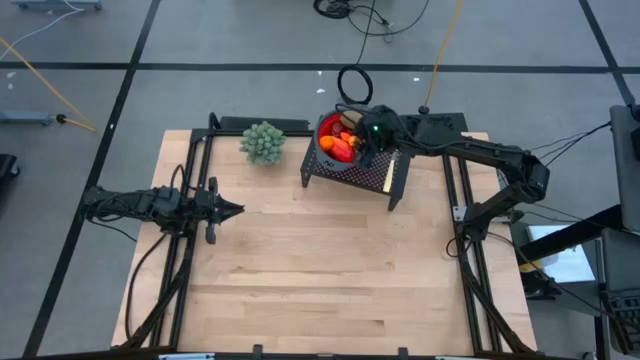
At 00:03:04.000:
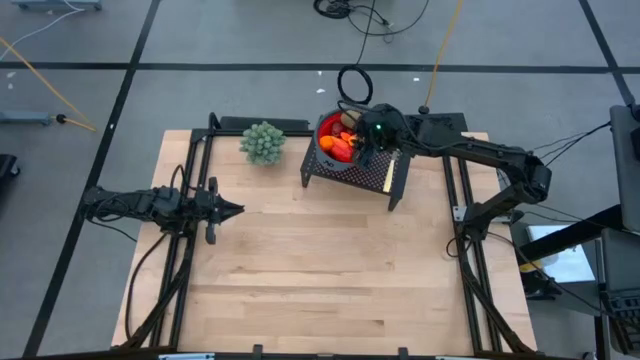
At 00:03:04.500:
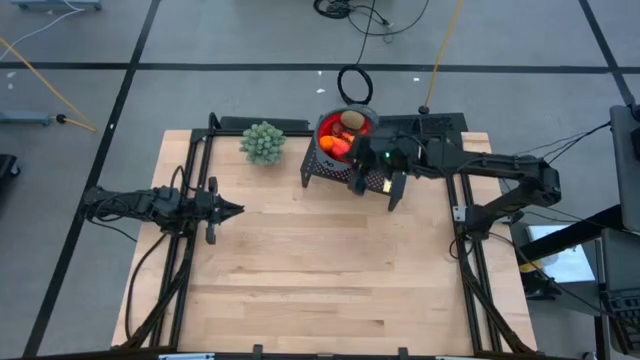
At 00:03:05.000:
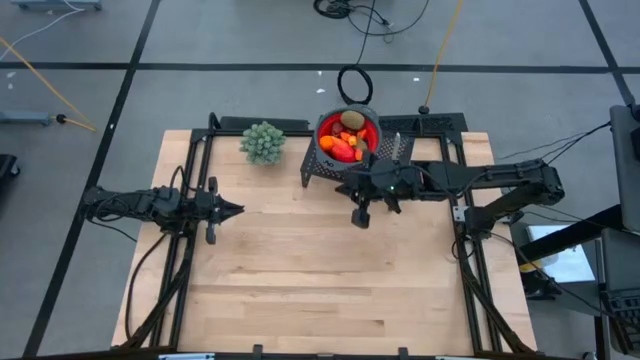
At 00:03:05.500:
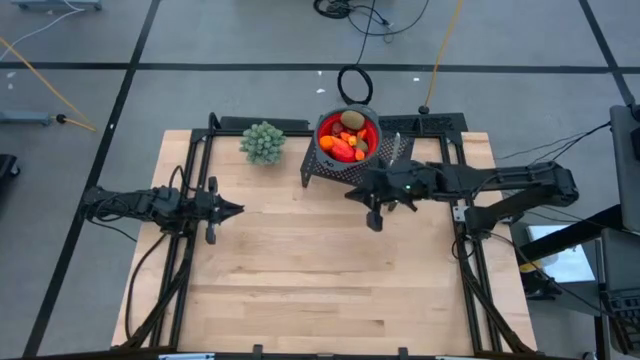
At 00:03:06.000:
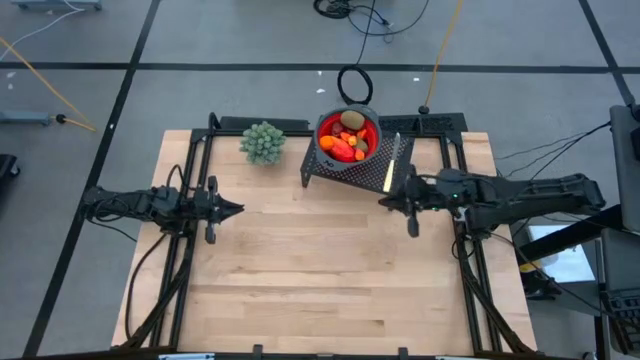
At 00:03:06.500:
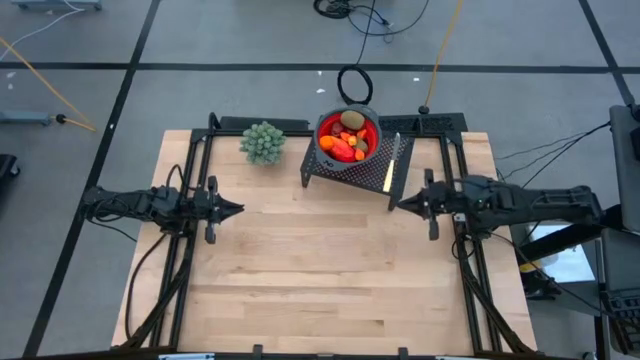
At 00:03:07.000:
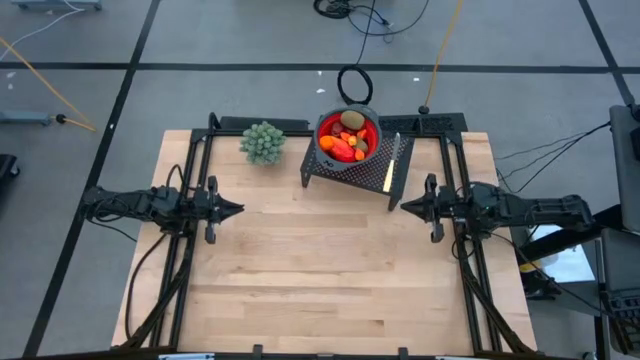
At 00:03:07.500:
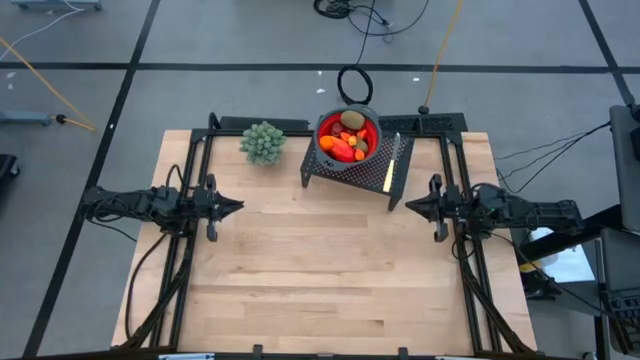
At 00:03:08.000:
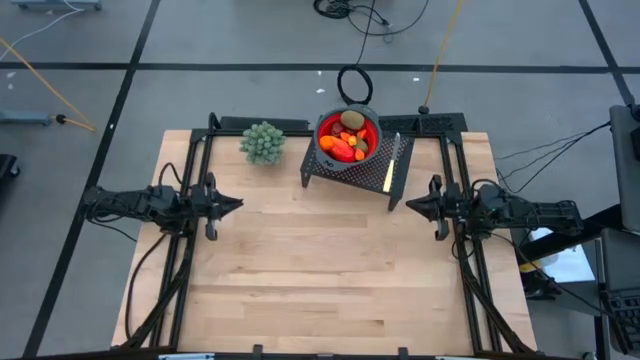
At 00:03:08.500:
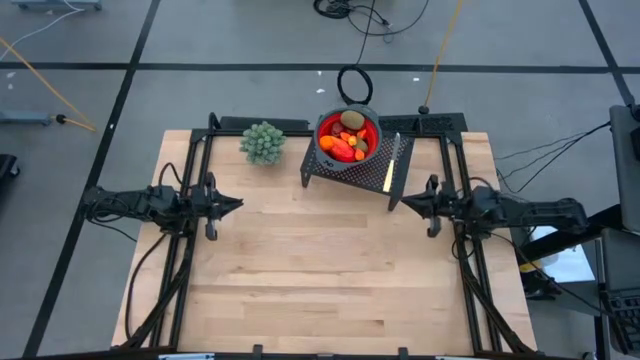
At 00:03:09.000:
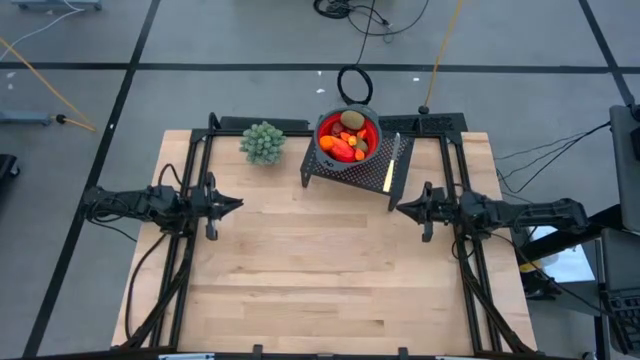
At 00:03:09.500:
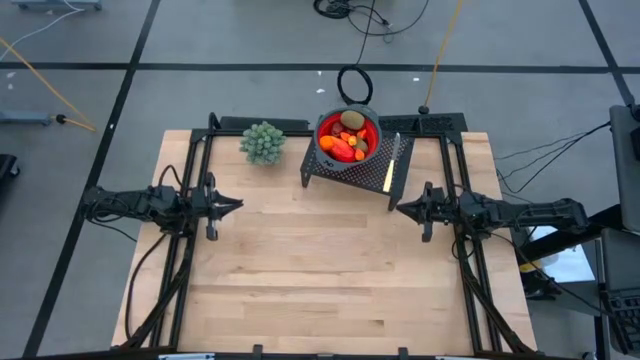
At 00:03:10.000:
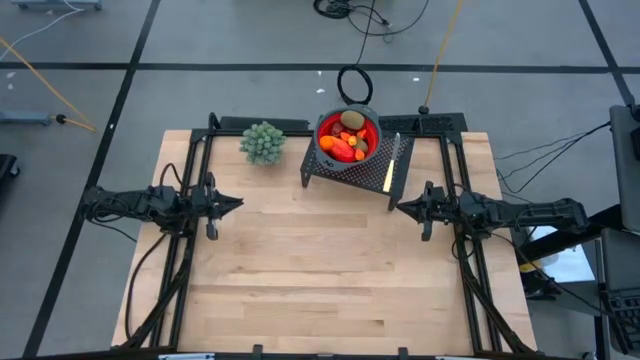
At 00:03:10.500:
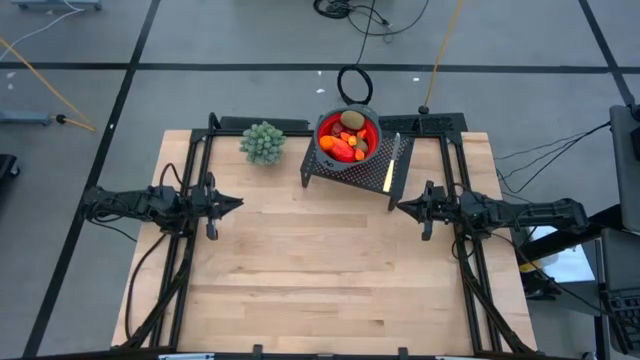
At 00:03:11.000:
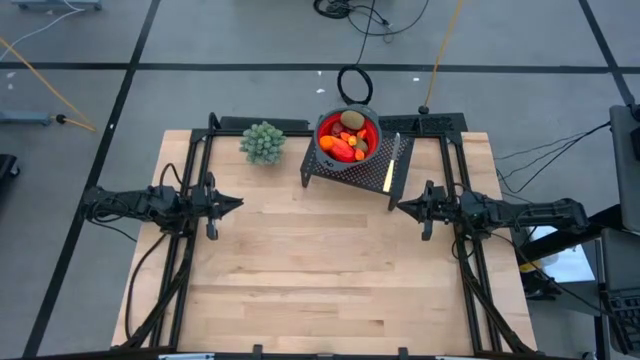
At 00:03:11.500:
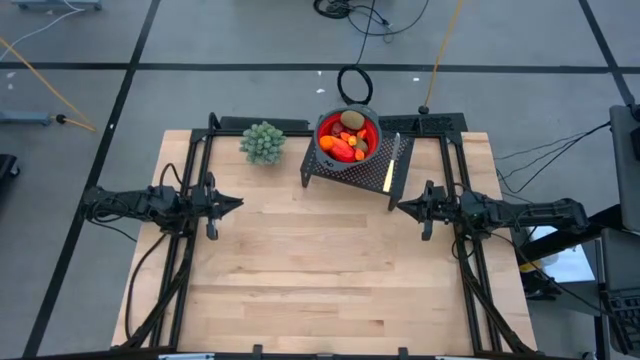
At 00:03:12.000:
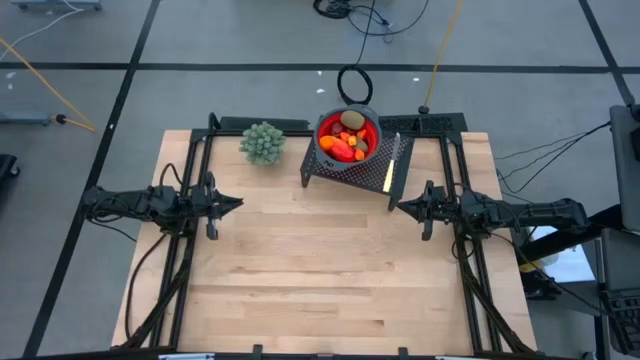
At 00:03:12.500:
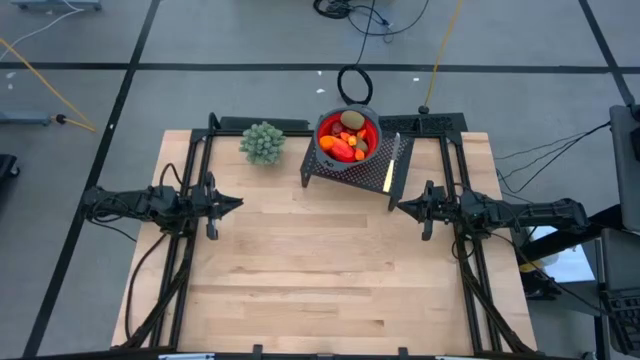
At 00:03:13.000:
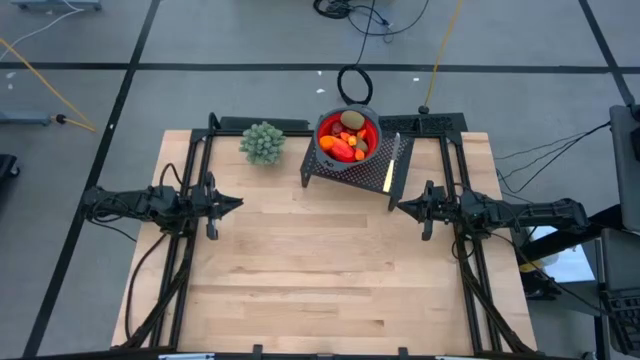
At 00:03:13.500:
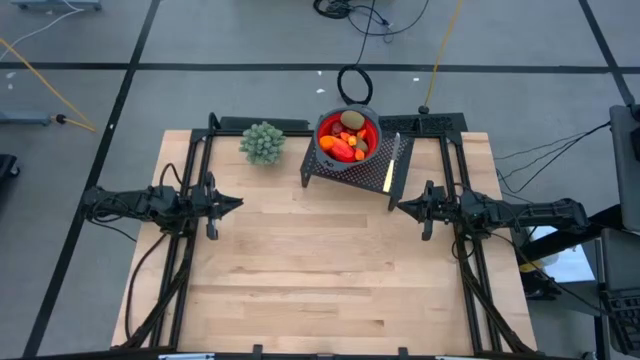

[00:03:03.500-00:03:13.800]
Task: Pick & Place Fruit
Return to Home Position

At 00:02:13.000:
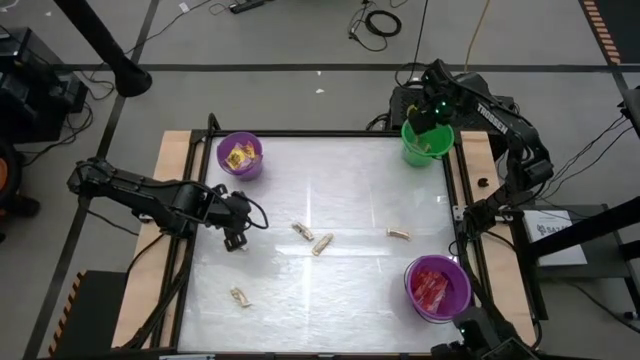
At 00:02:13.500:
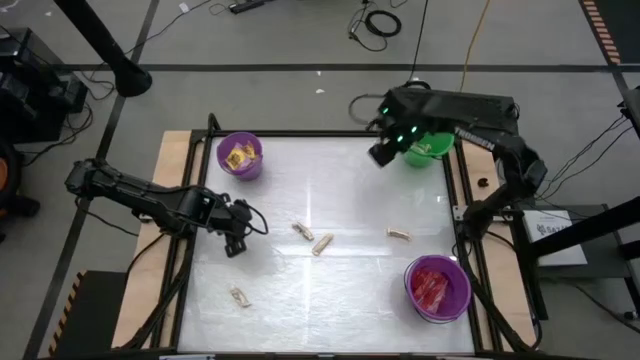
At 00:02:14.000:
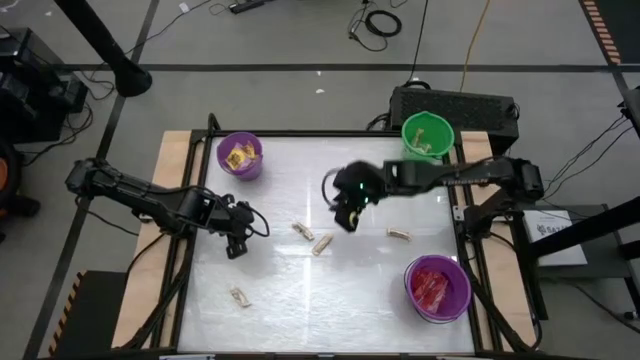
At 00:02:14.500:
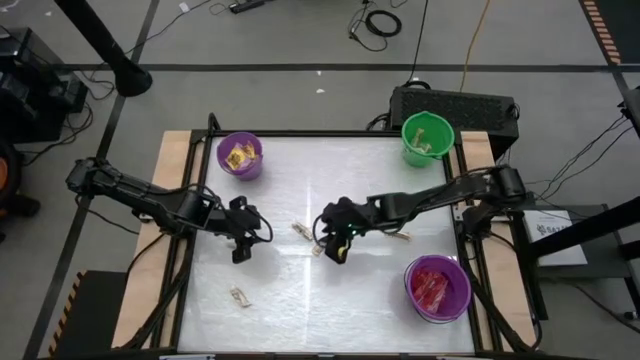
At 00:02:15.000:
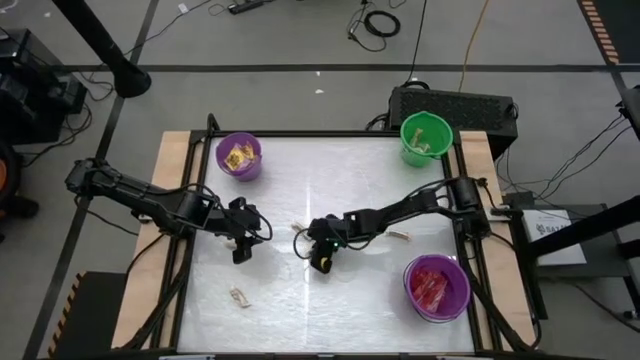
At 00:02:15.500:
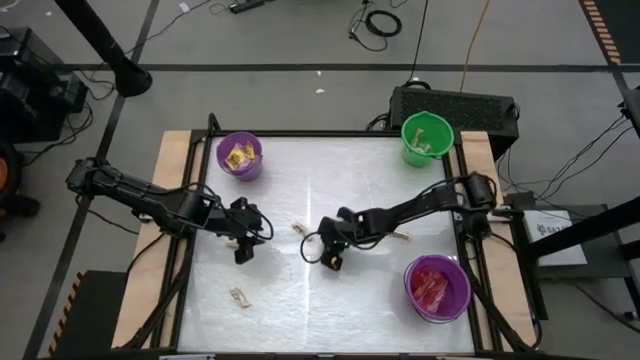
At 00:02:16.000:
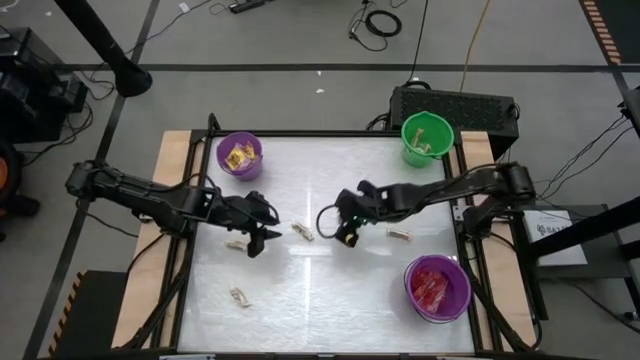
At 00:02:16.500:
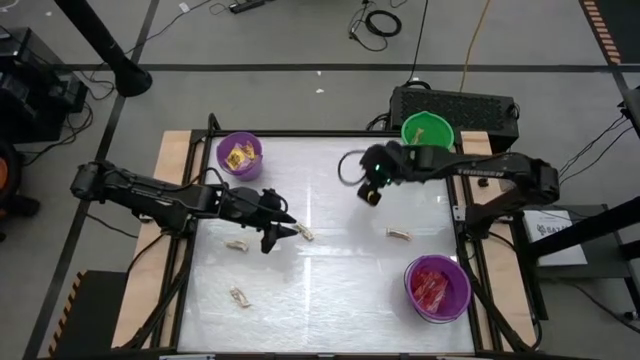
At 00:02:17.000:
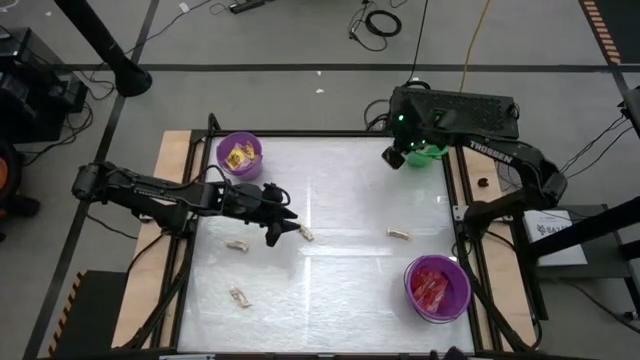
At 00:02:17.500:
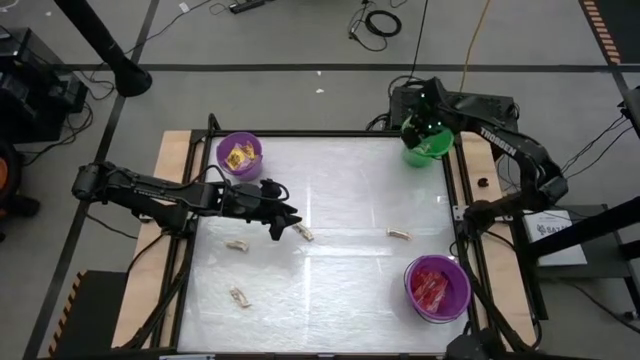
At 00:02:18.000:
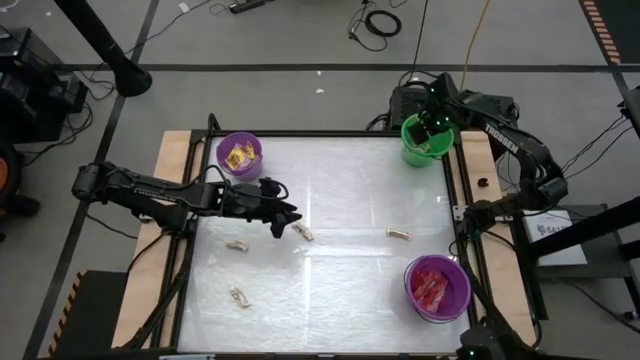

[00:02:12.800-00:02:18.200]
Task: Sort candy by brand, put in halloween buckets
Put the white candy into the green bucket

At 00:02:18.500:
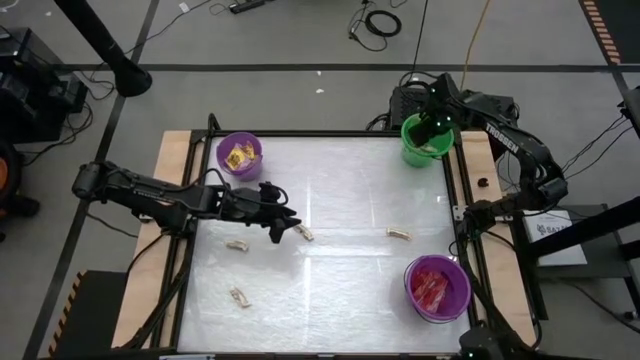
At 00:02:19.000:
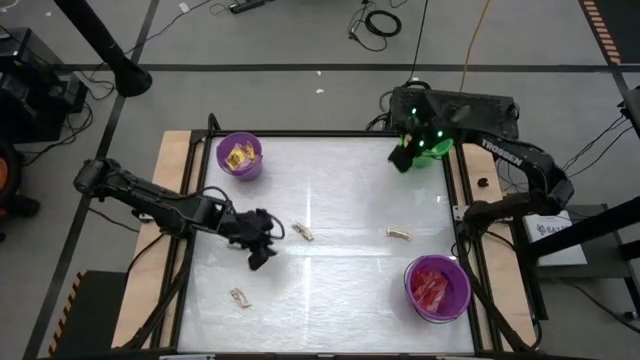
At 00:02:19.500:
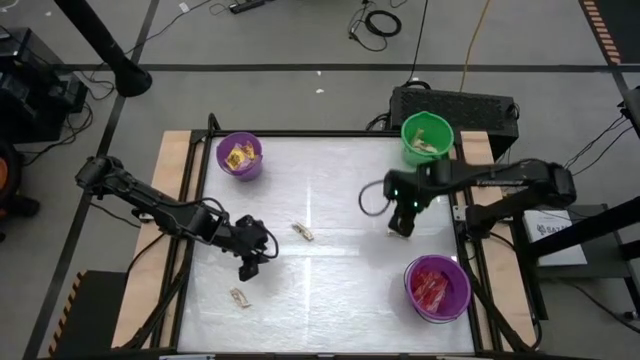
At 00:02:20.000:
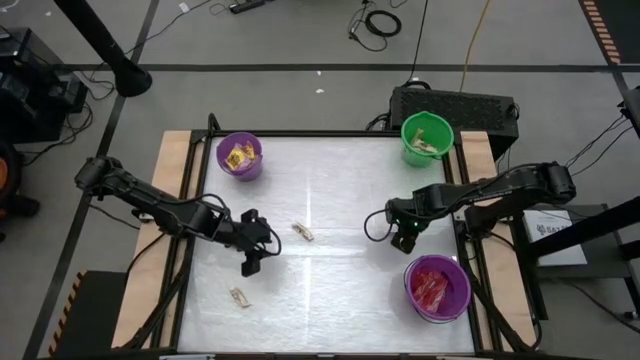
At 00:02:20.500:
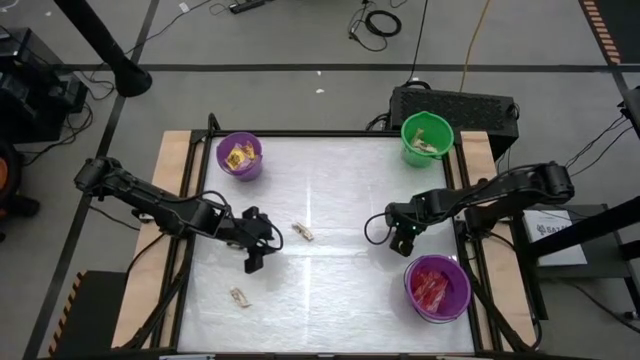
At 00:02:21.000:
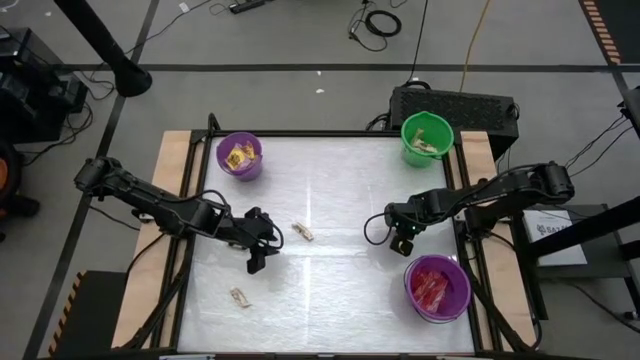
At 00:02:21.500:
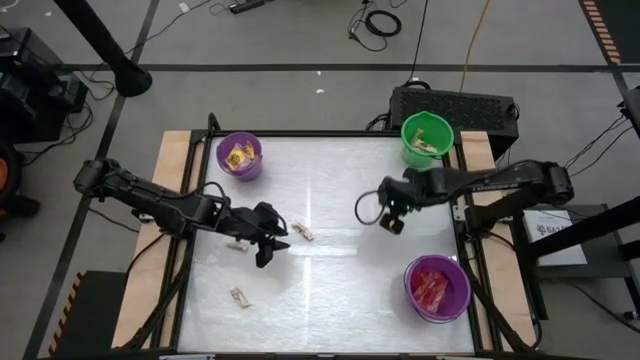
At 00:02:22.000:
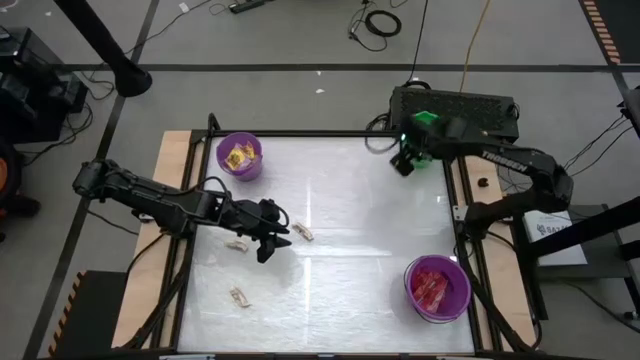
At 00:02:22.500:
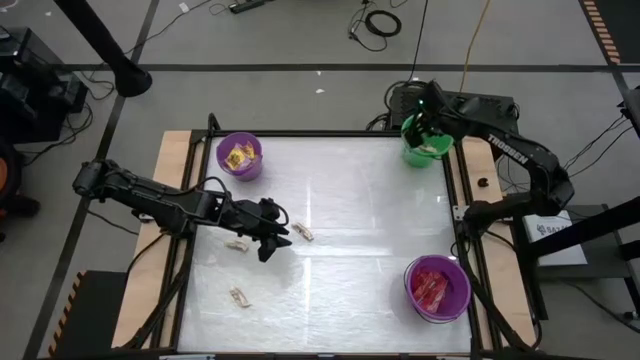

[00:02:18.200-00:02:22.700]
Put the white candy into the green bucket
